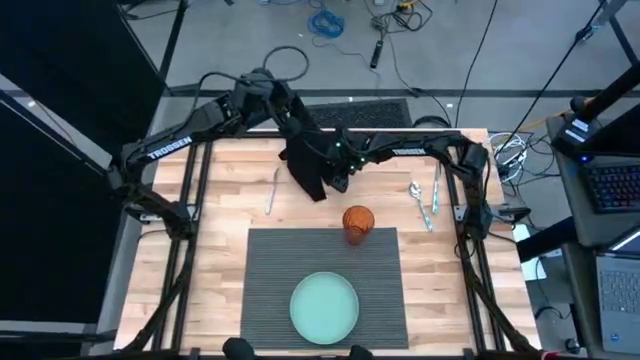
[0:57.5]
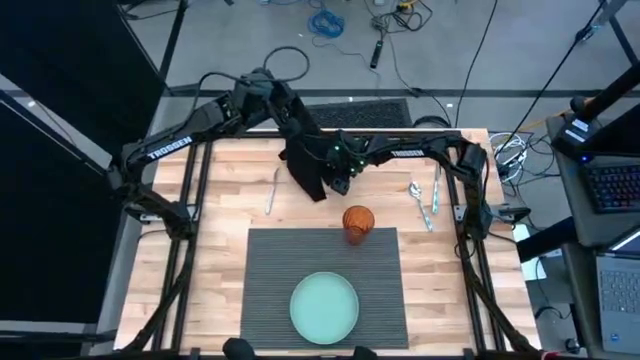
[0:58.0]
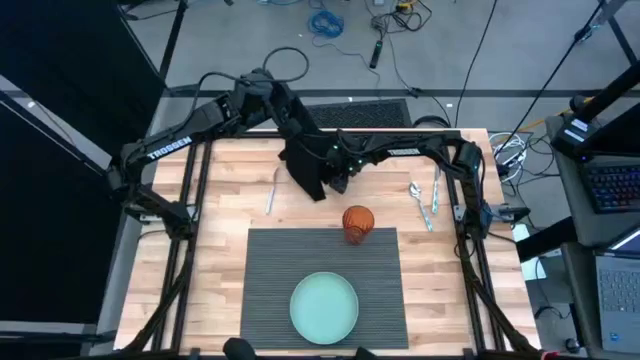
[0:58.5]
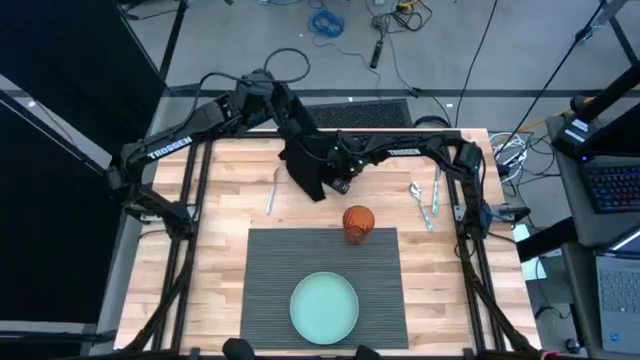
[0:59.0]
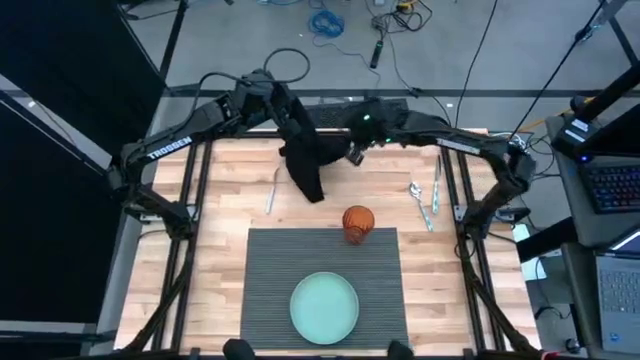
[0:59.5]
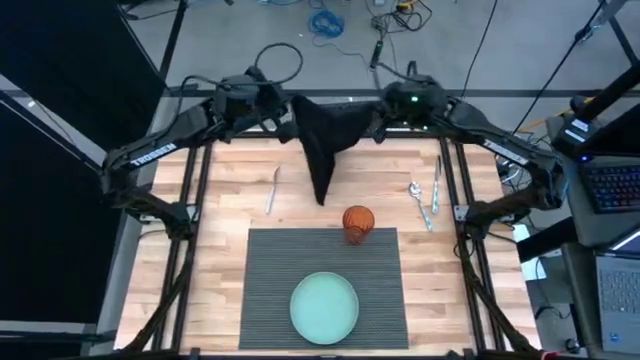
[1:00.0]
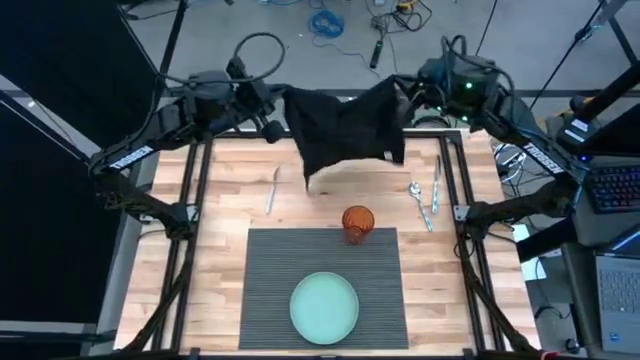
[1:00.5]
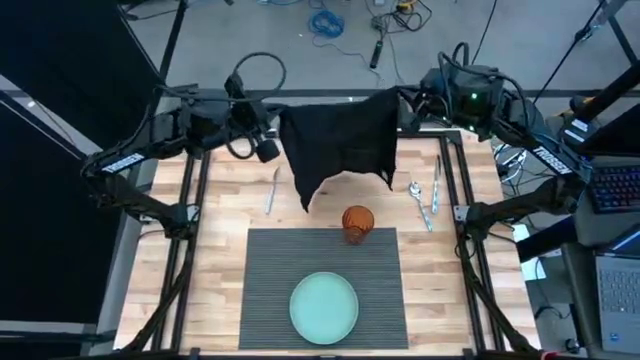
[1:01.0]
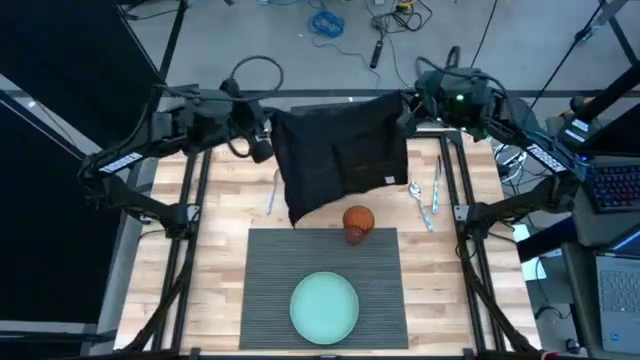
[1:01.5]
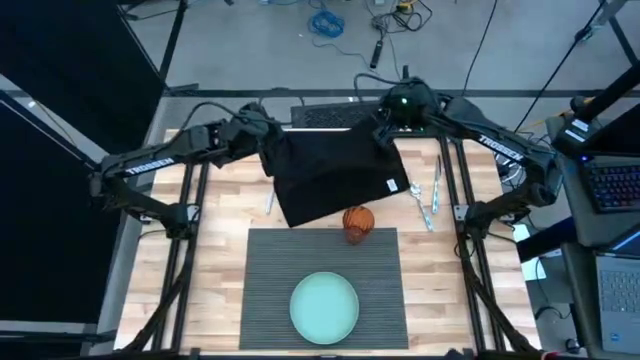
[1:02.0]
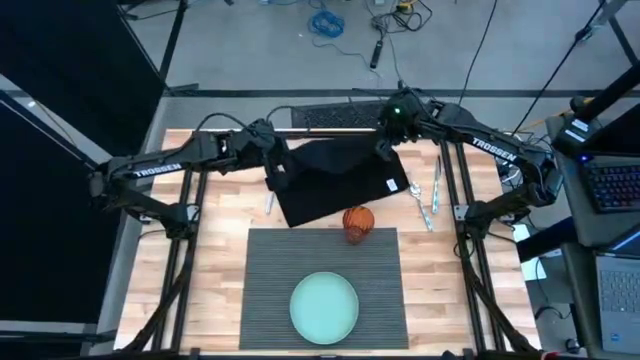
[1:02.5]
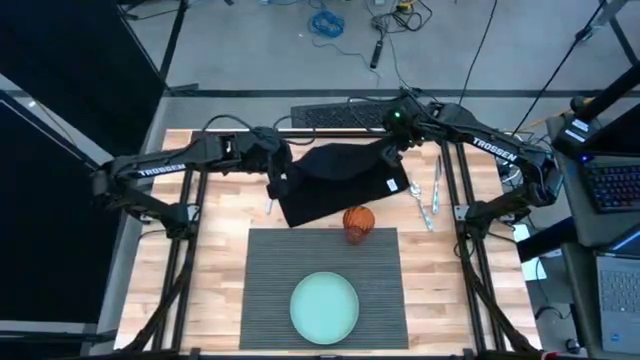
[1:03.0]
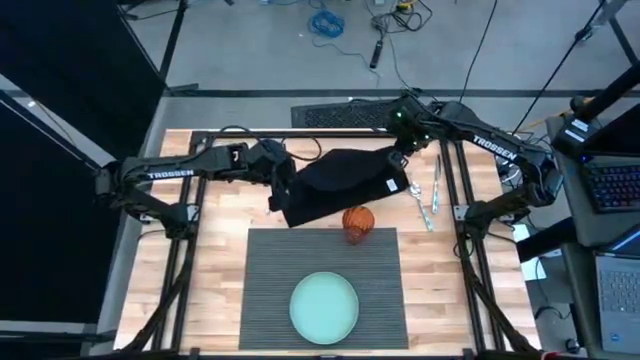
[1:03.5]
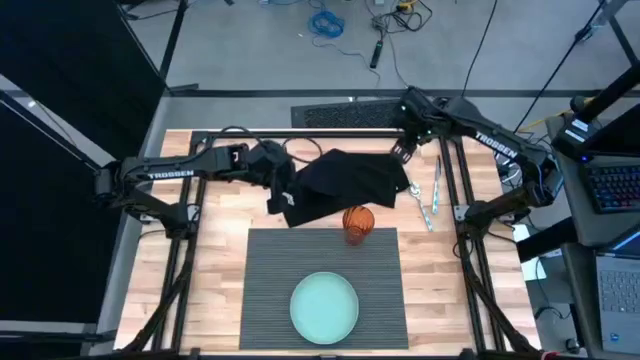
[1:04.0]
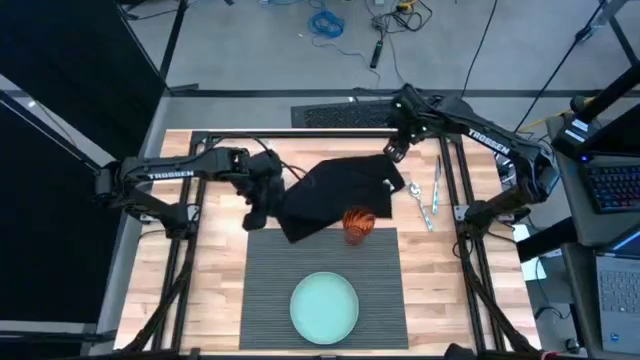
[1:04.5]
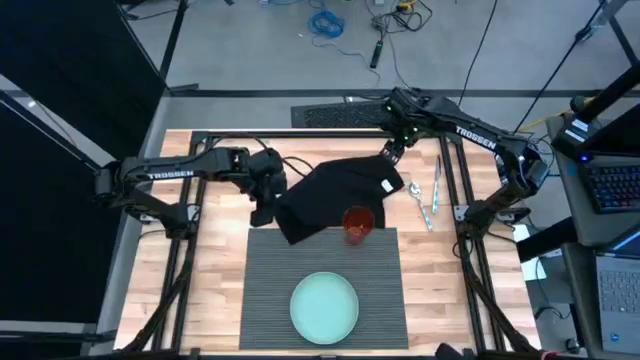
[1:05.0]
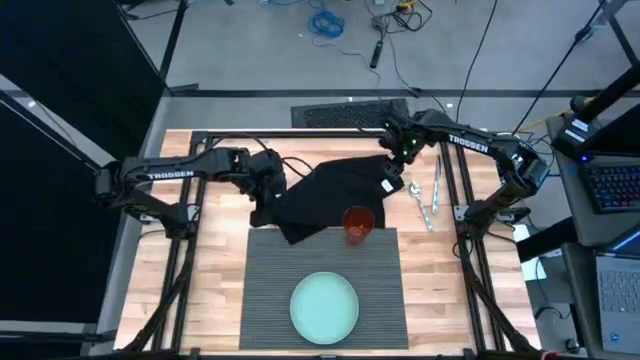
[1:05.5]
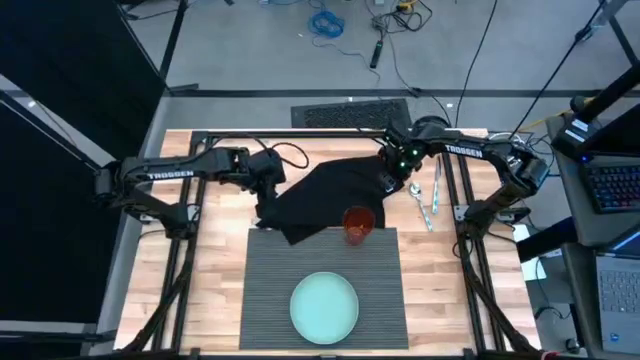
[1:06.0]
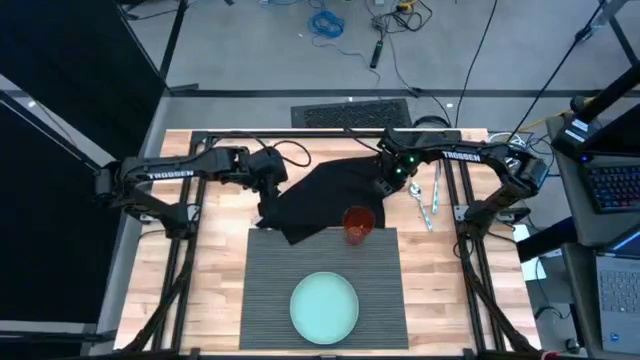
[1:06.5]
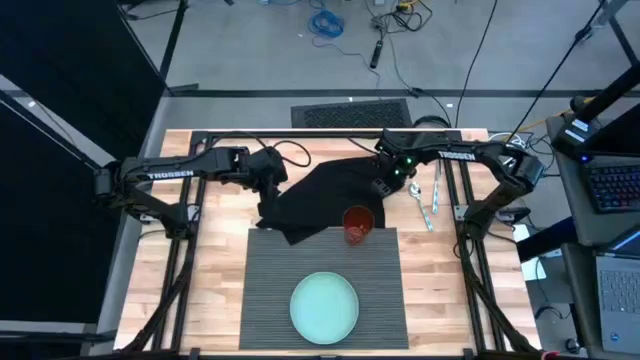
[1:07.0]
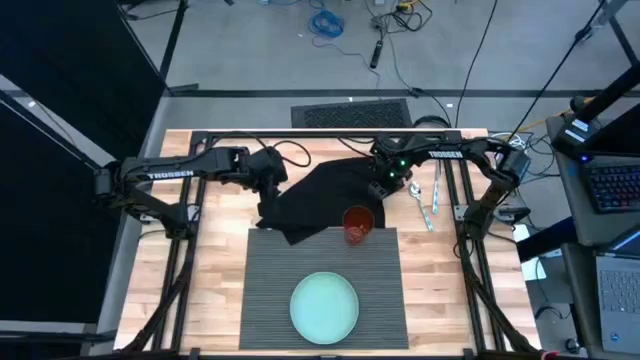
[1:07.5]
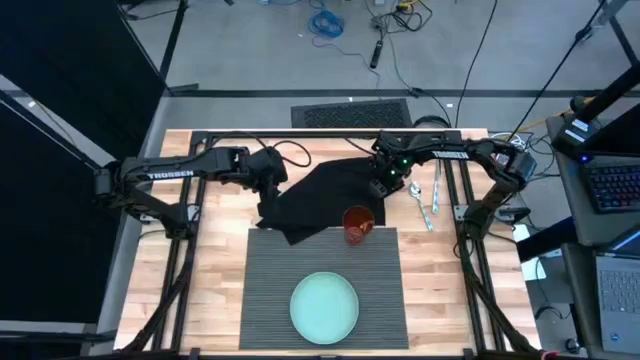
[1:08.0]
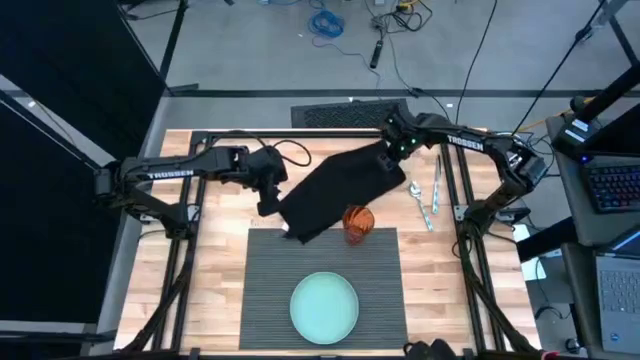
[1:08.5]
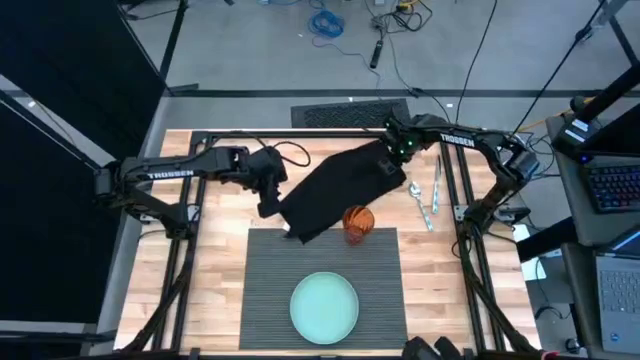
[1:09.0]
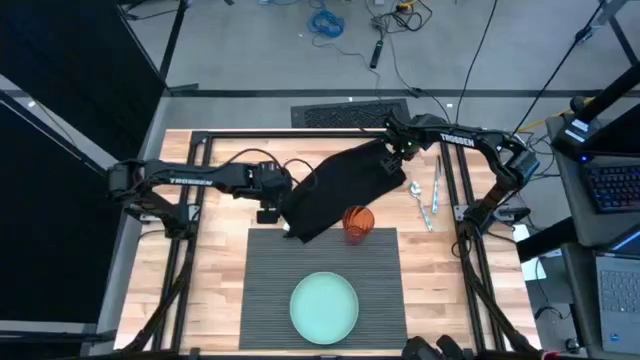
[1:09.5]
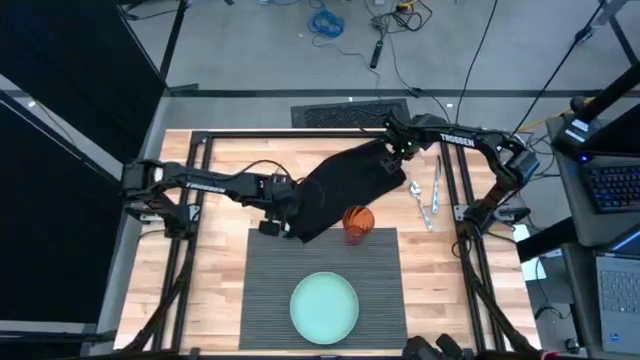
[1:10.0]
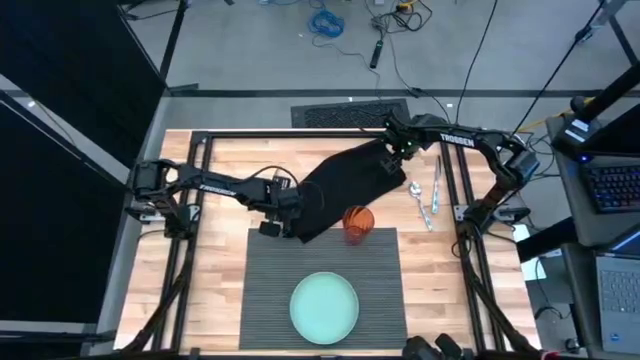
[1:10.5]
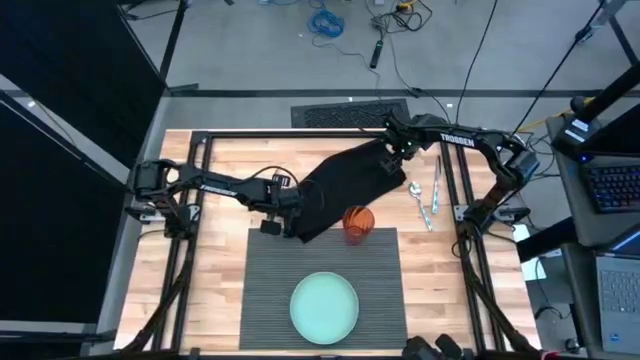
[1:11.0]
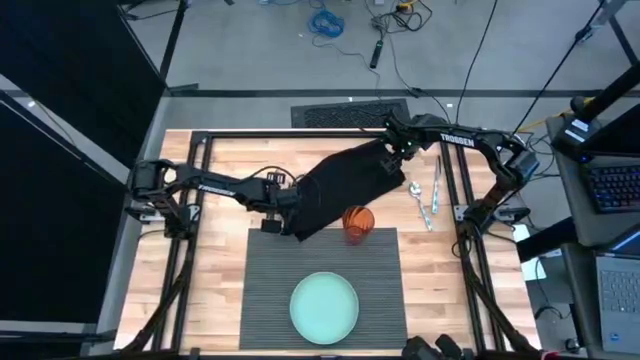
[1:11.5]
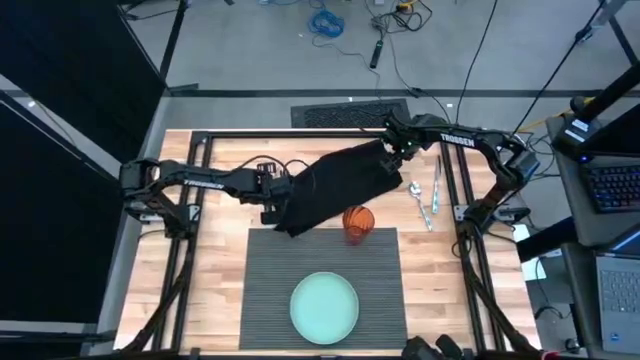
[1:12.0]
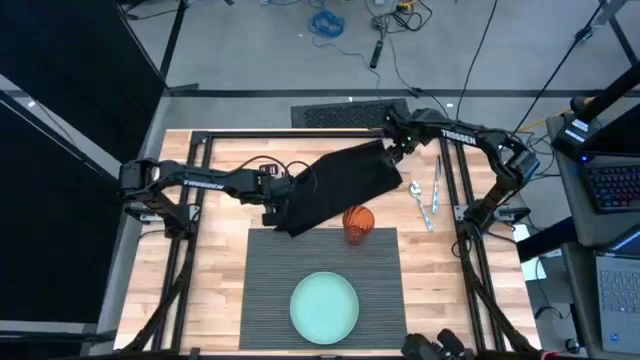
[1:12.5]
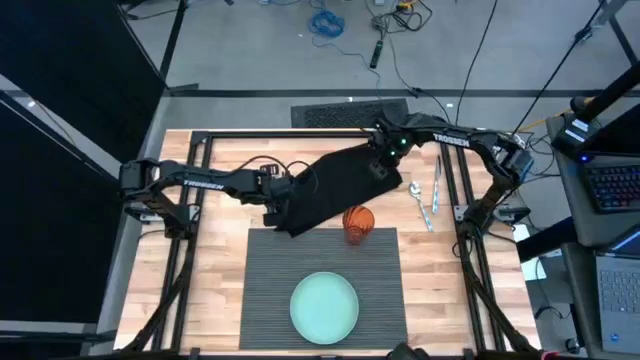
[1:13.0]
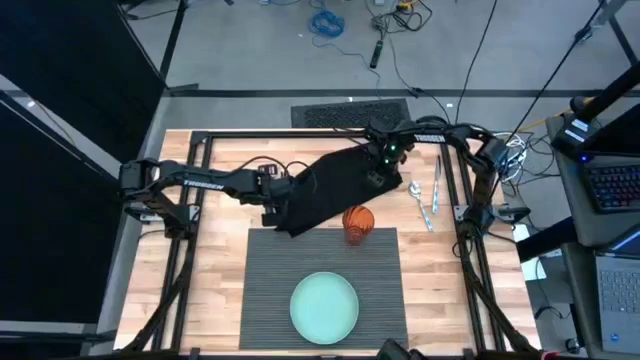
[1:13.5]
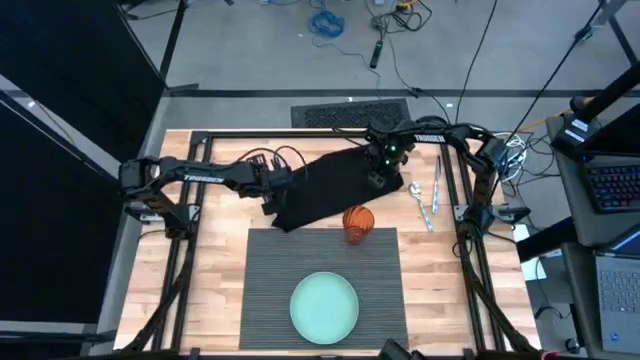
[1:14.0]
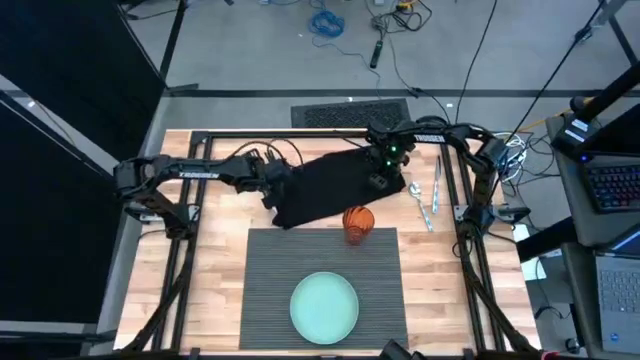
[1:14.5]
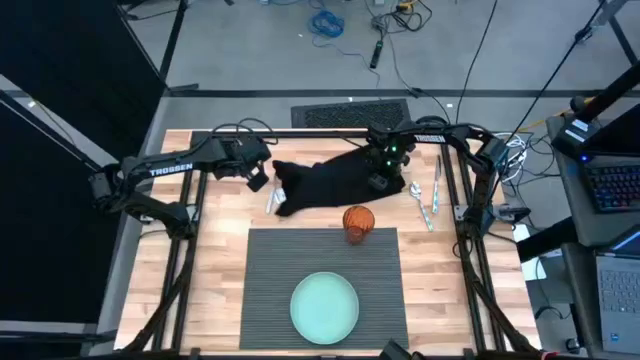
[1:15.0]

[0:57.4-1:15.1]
Task: Set table place
Fold the black napkin

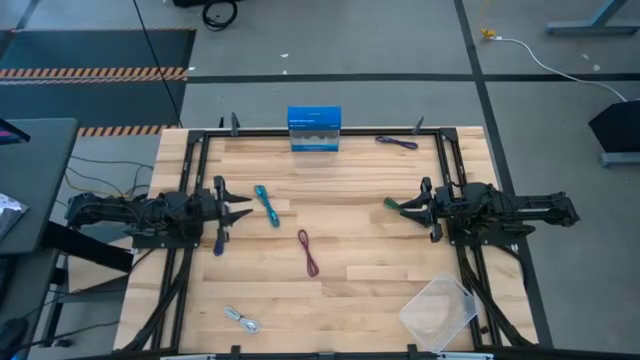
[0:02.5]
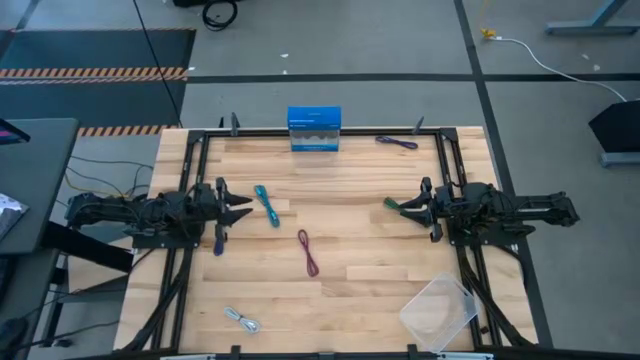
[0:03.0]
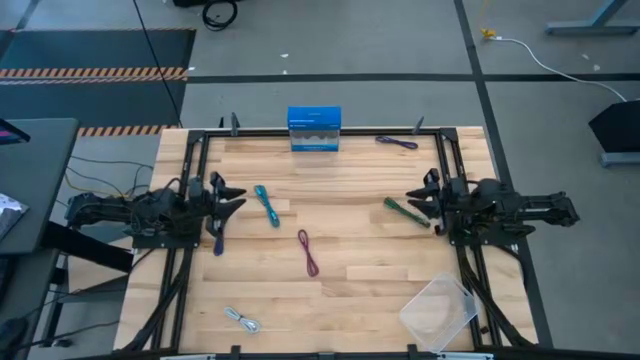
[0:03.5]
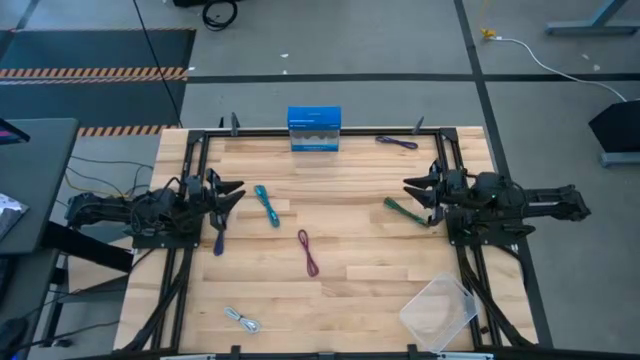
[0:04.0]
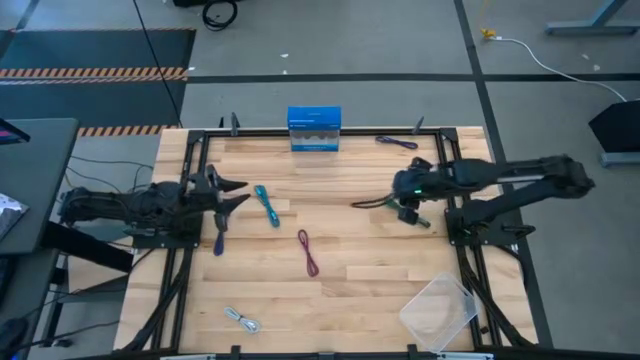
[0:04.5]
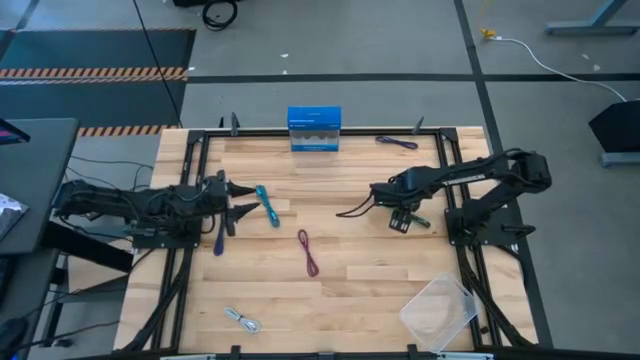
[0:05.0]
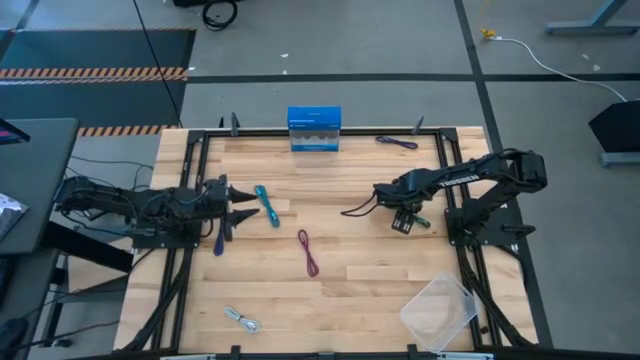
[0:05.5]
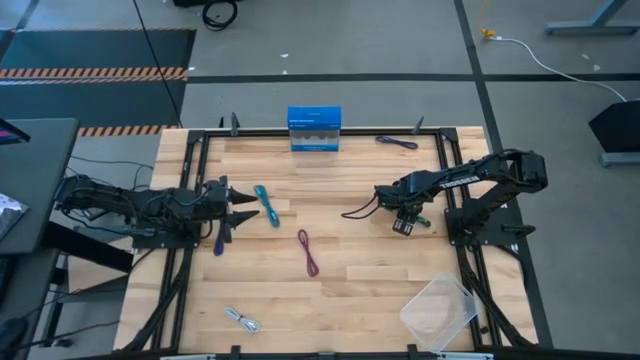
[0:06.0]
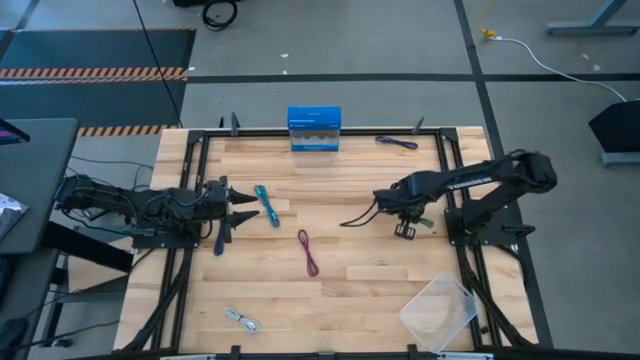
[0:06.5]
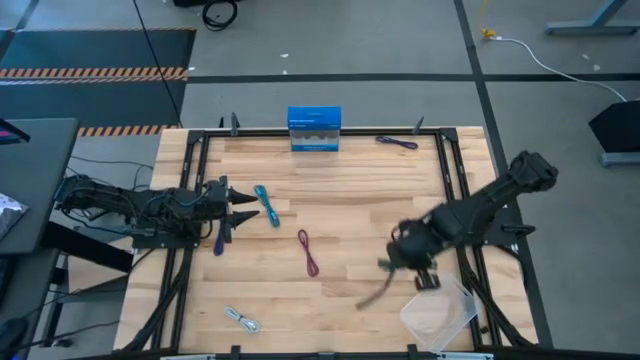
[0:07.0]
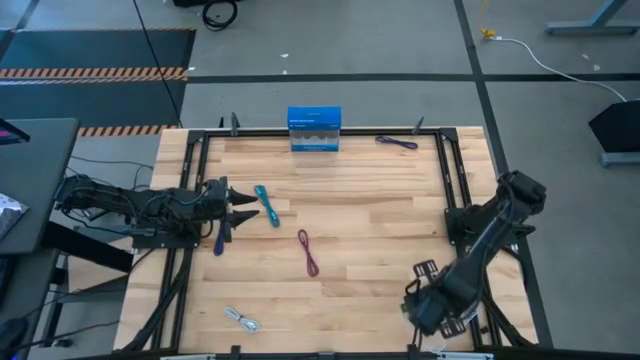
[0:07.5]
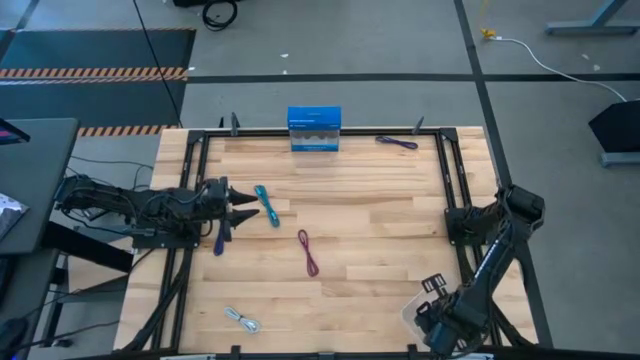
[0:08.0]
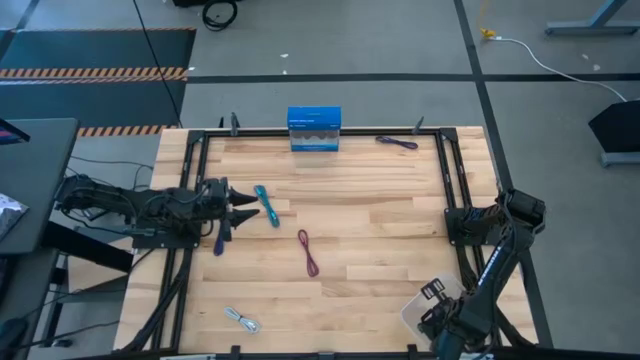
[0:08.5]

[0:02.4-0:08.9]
Task: Pick and place USB-C Cables
Put the green charger cable into the transparent bin
